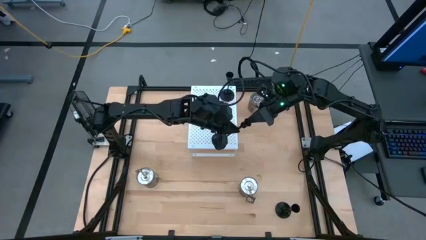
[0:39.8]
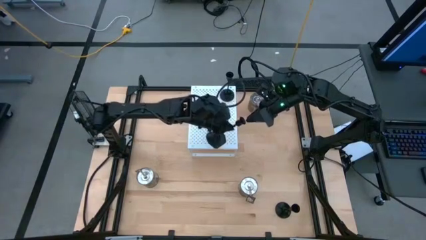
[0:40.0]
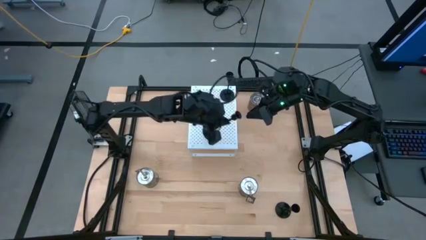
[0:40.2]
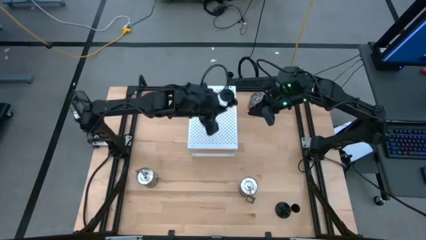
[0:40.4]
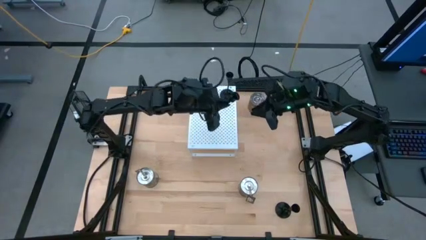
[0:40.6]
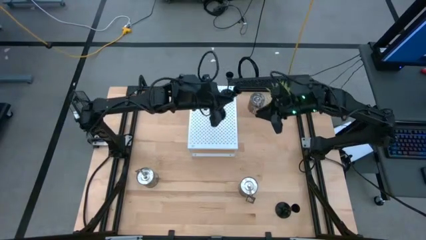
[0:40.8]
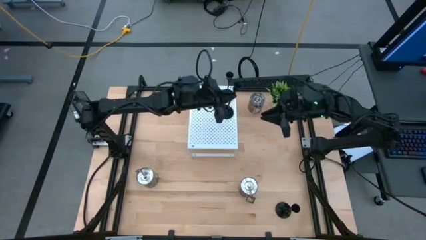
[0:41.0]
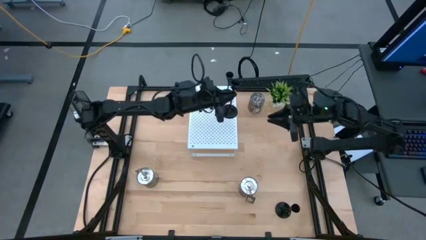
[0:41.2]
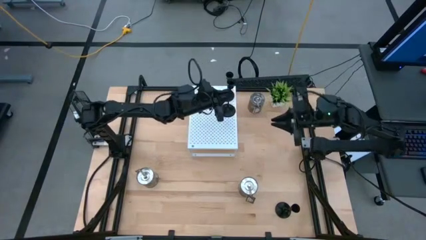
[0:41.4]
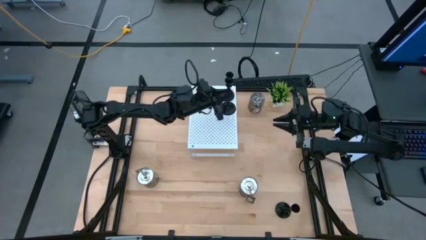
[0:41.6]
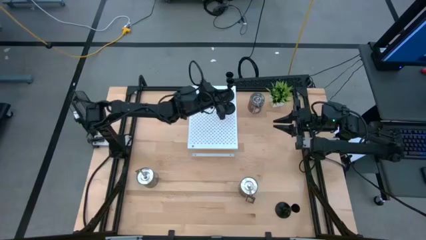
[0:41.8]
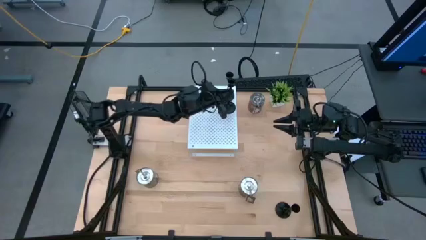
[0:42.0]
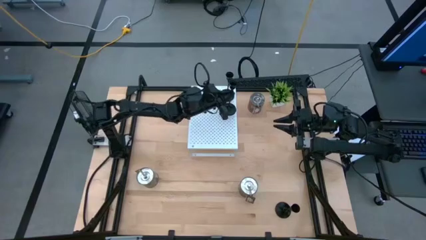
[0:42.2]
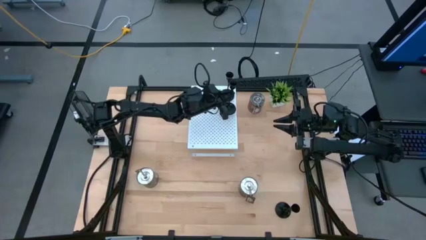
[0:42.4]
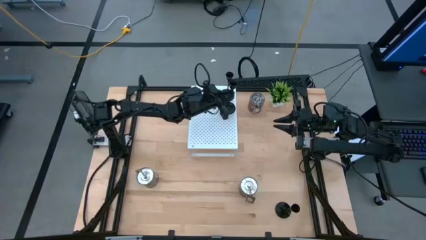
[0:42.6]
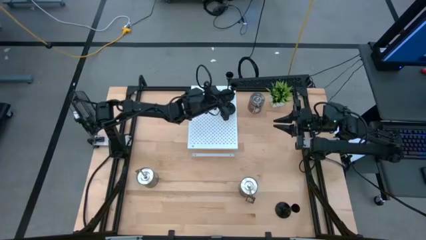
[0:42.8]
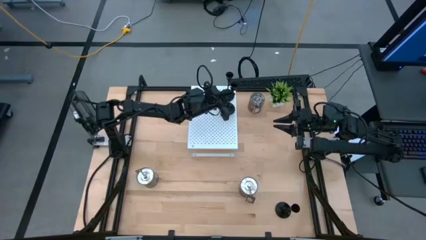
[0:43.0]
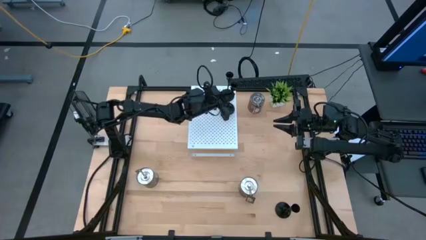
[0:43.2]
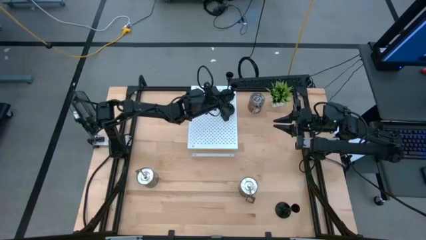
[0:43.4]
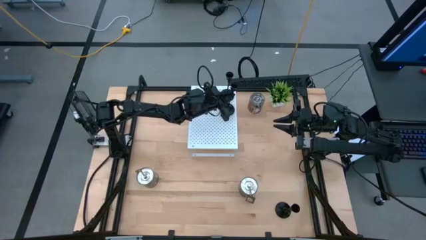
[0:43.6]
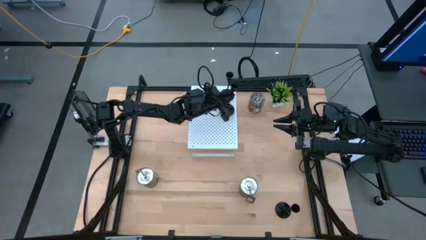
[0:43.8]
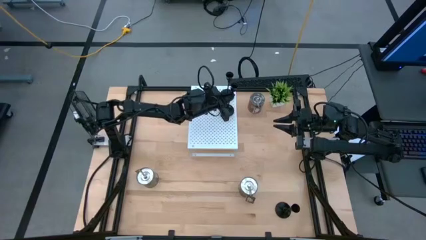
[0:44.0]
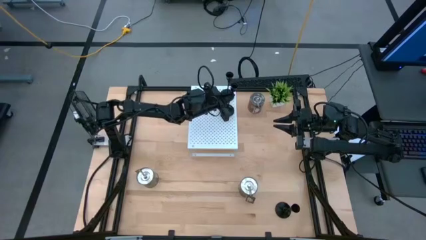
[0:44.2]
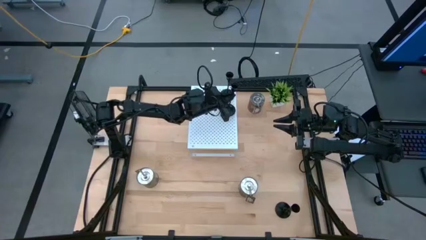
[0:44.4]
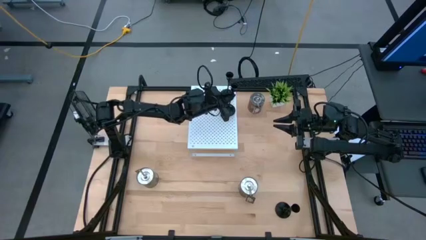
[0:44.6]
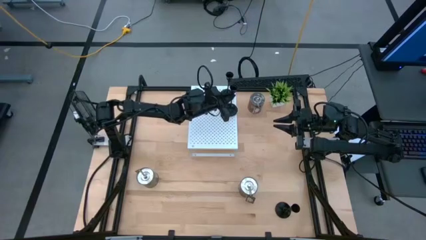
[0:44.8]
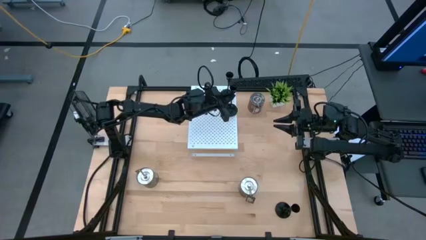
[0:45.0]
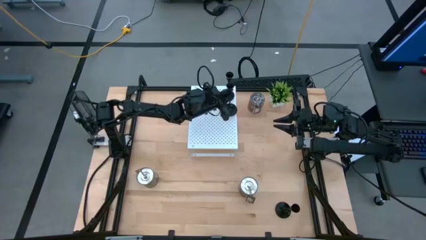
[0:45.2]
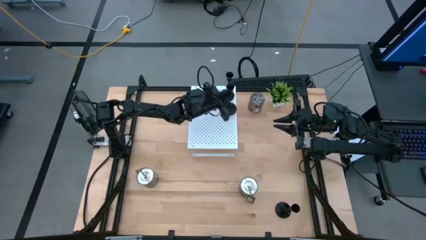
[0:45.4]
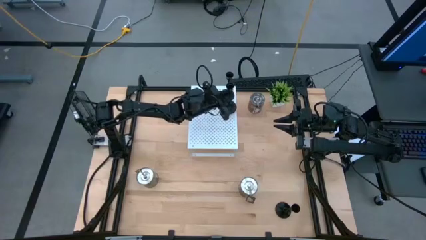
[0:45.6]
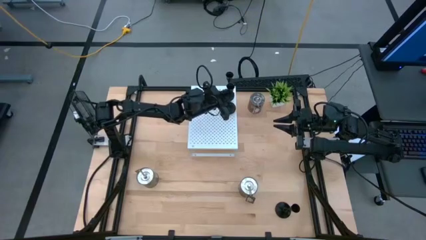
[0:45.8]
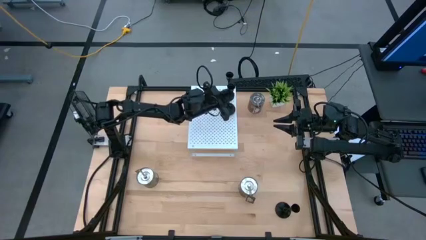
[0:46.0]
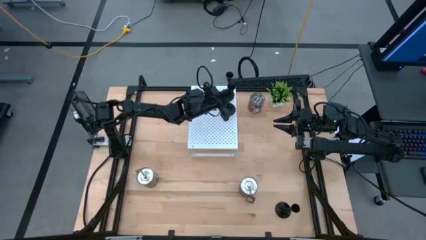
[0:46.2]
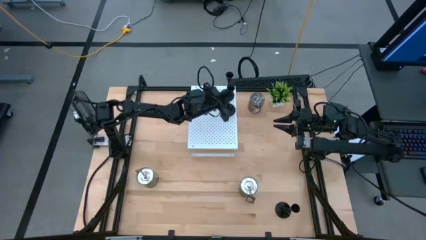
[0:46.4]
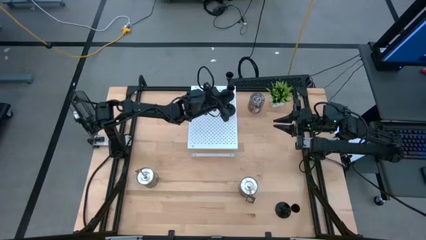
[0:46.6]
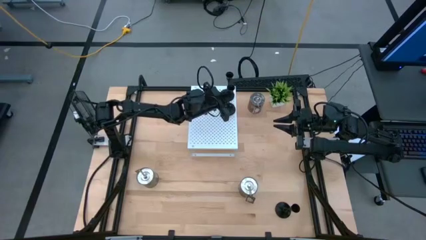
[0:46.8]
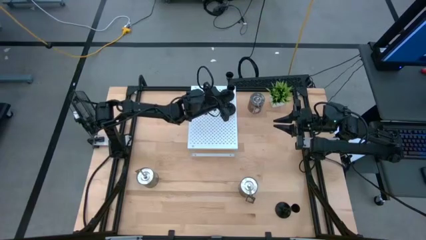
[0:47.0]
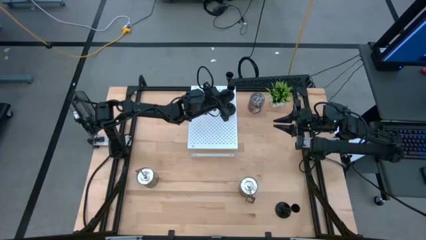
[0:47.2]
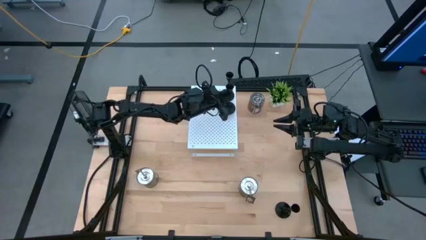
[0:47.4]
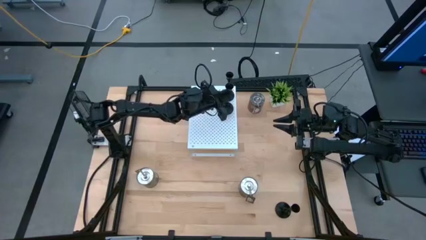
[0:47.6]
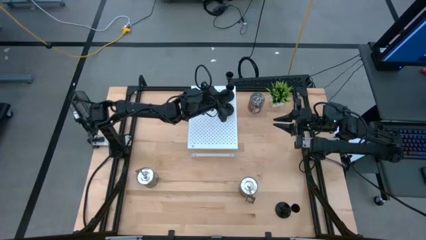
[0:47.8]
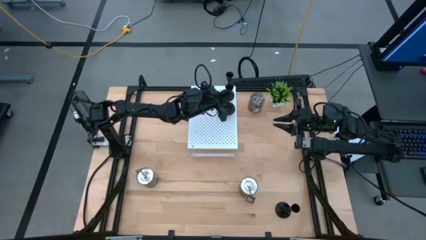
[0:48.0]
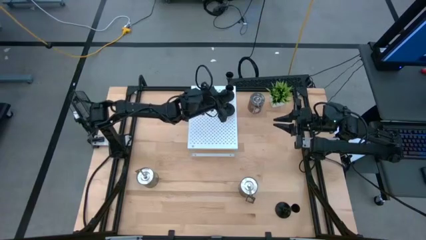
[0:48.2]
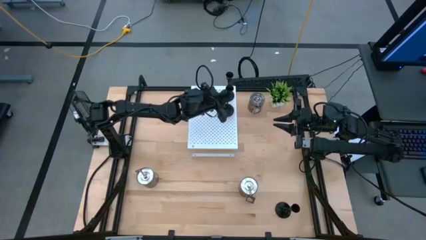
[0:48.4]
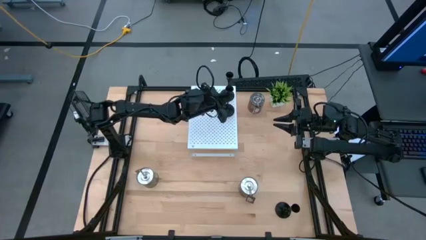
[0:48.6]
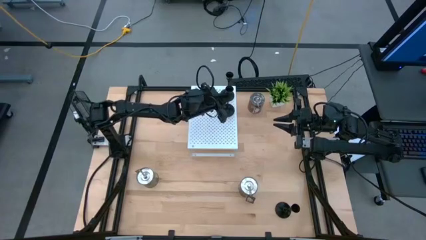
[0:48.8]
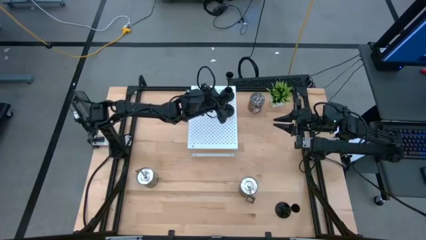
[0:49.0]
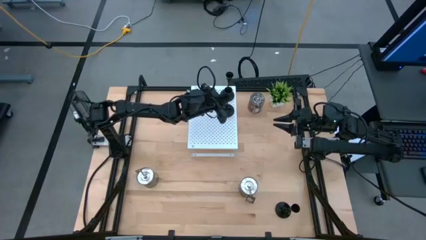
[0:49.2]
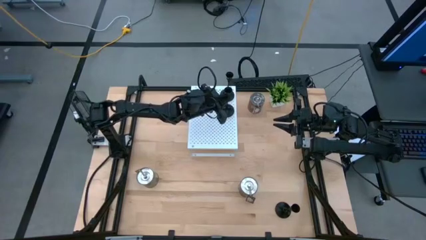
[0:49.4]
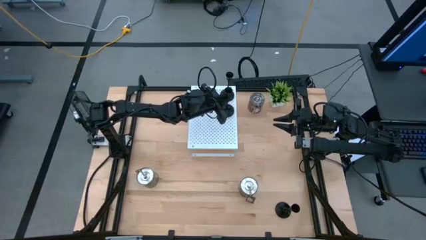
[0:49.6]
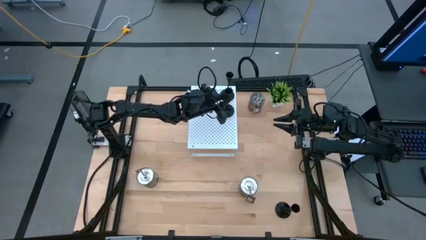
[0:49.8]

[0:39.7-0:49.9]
Task: Pick & Place candle stick holders
Put the top black candle holder on the shelf aligned with the other black candle holder

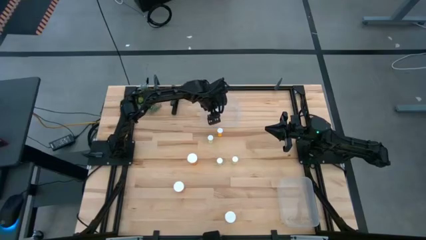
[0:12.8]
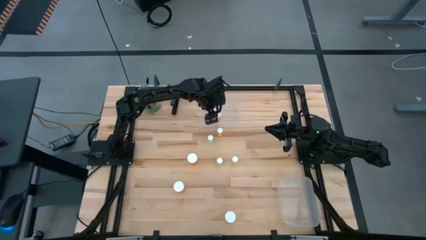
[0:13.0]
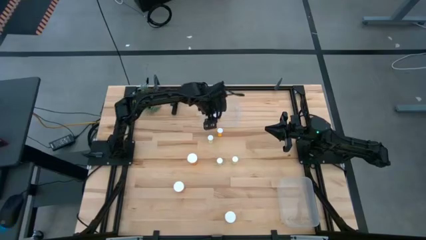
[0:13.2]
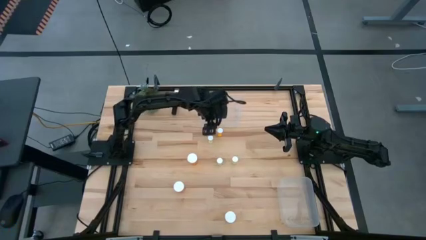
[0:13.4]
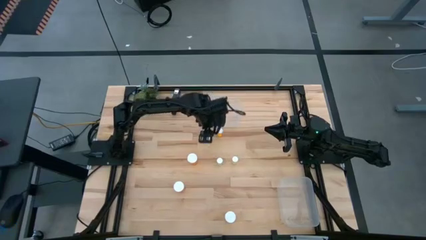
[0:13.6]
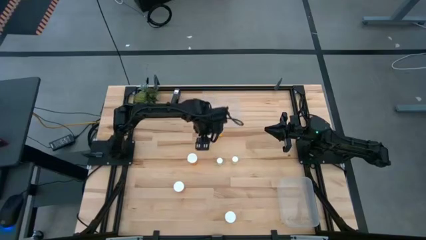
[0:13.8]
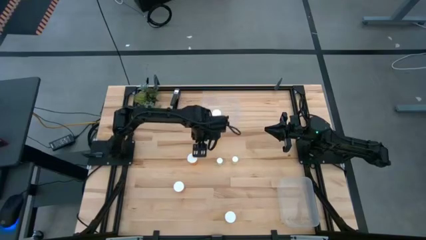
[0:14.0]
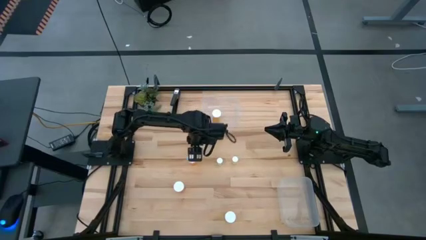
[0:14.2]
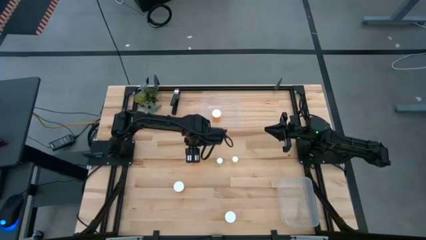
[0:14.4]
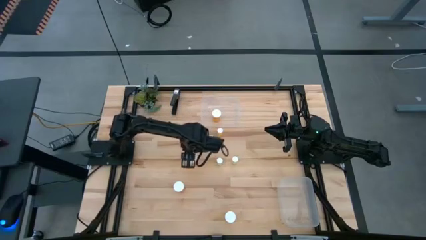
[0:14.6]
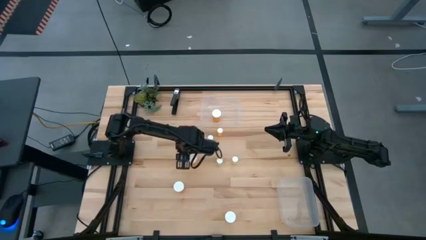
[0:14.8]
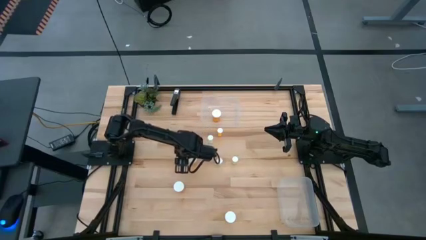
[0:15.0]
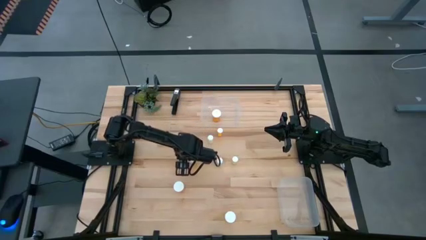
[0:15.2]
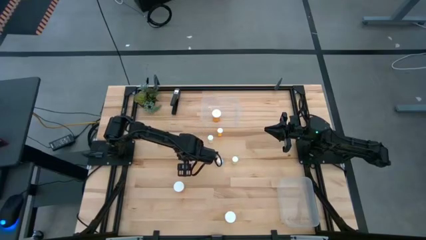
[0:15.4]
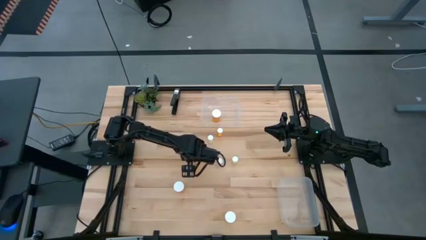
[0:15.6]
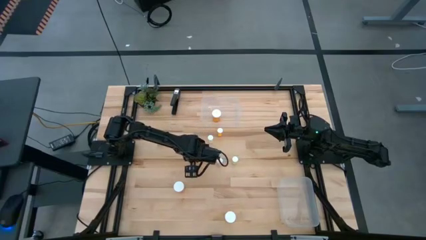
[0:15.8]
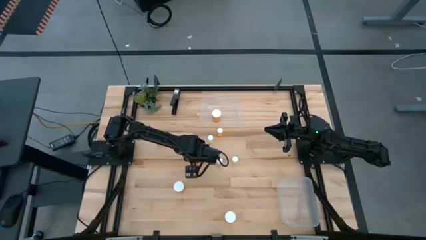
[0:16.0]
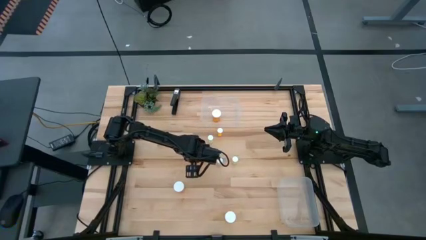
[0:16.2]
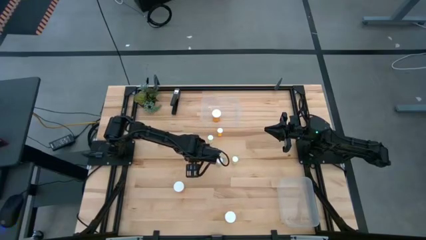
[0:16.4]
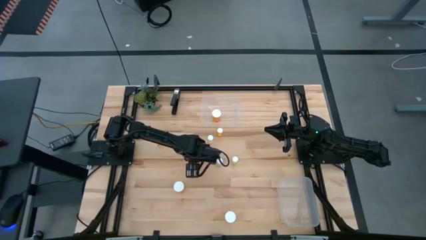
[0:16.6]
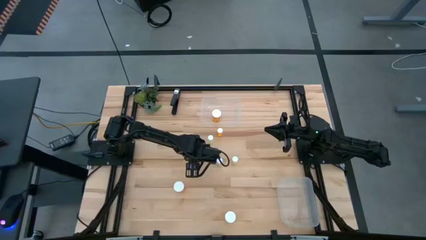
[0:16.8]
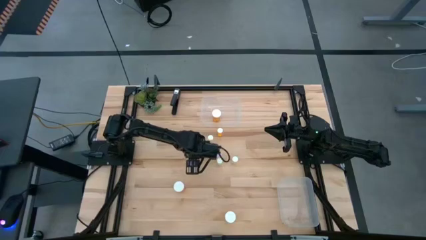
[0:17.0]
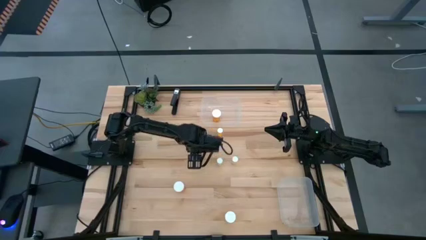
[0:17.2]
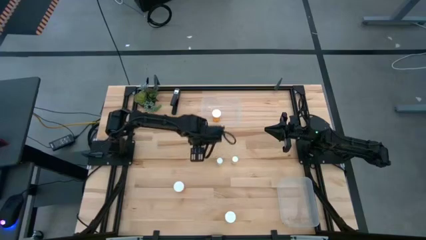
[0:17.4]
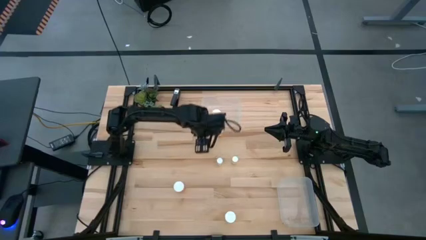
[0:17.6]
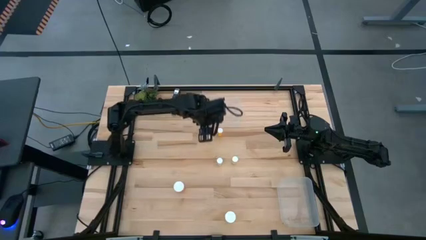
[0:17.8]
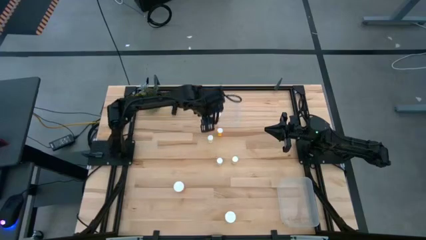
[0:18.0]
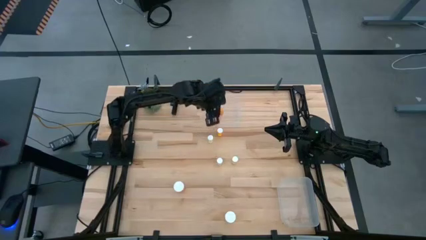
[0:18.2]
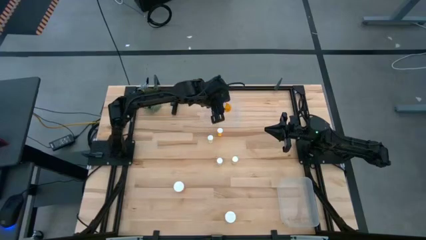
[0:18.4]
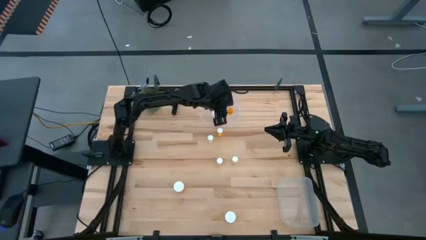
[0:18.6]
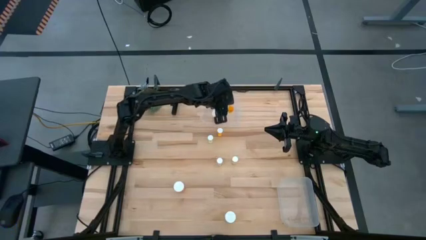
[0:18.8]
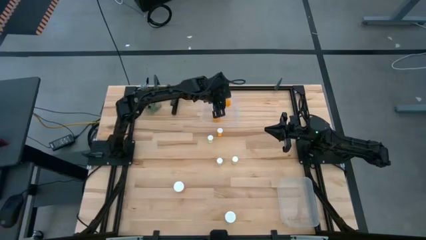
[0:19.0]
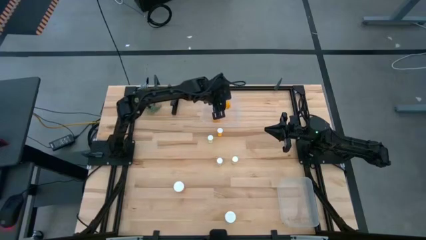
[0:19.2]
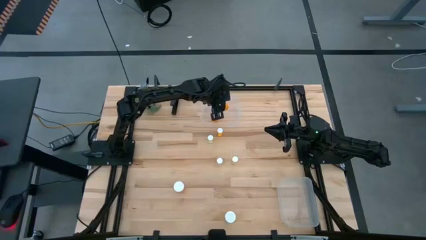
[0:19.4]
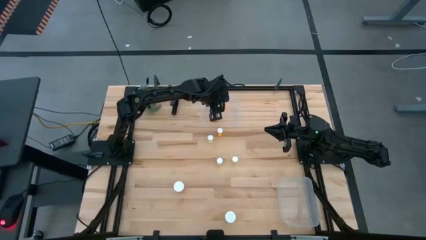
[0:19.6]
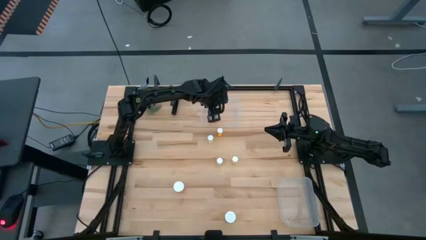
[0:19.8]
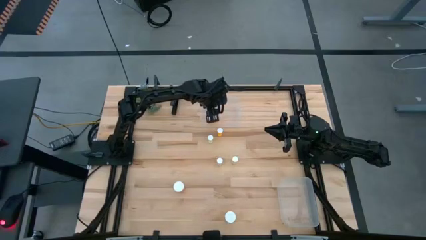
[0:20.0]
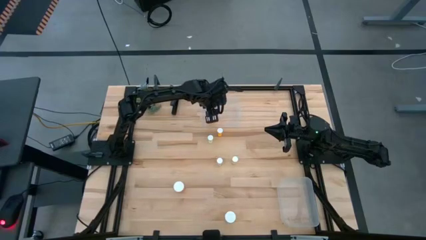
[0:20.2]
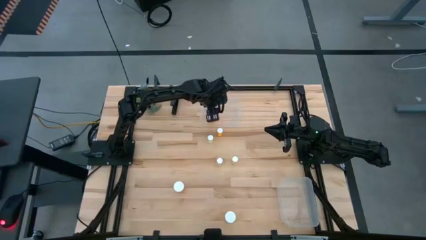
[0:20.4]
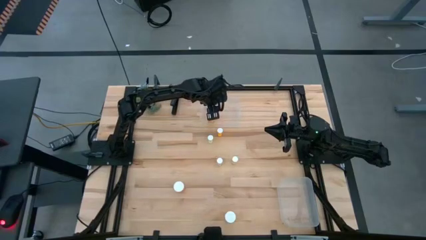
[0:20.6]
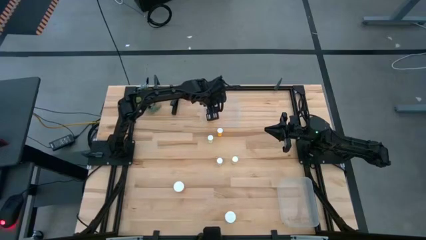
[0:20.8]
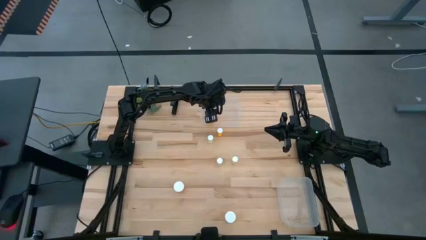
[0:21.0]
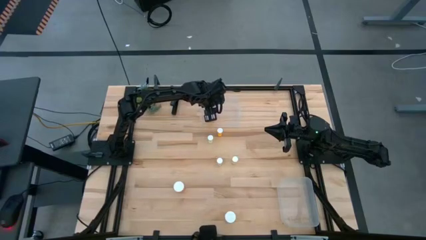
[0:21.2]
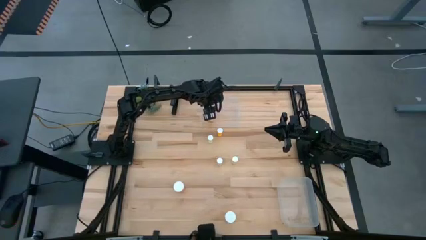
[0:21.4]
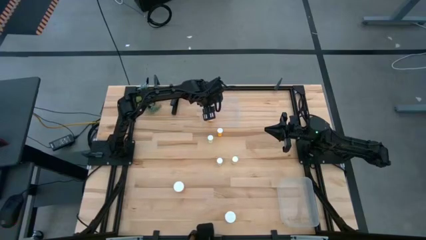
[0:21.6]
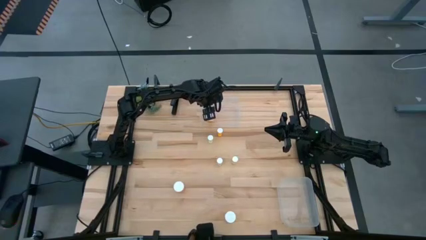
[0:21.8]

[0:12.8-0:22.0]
Task: Pick and place medicine bottles into bin by pill shape (circle, oval)
Put the orange capsule bottle into the top transparent bin
